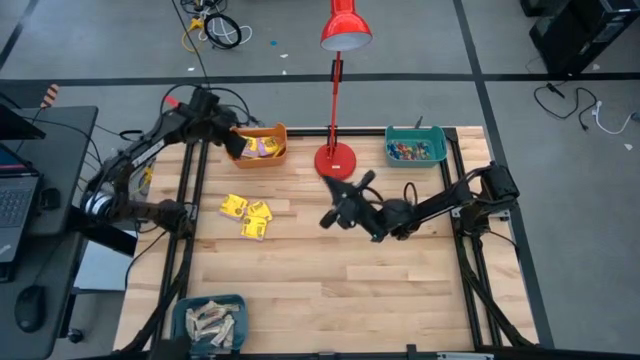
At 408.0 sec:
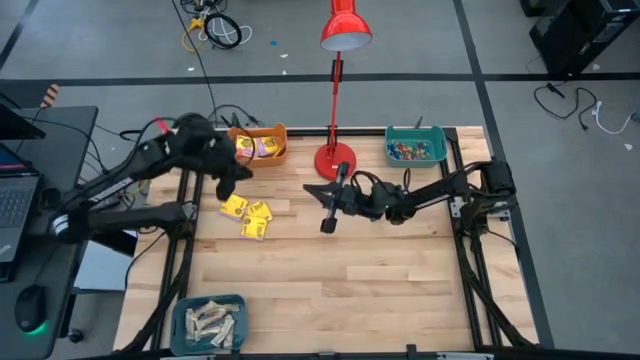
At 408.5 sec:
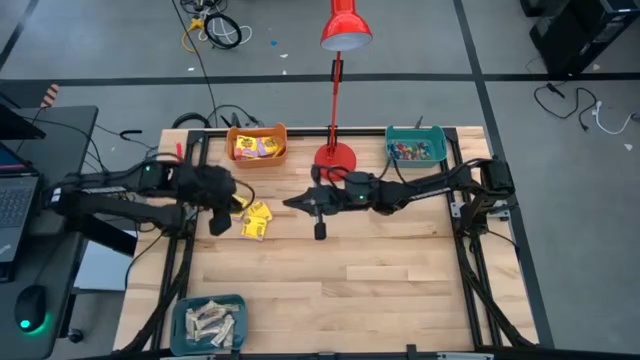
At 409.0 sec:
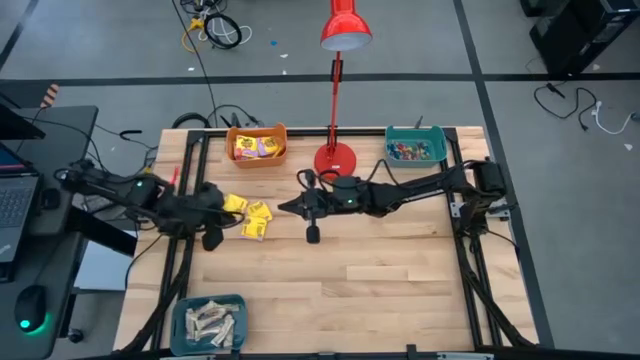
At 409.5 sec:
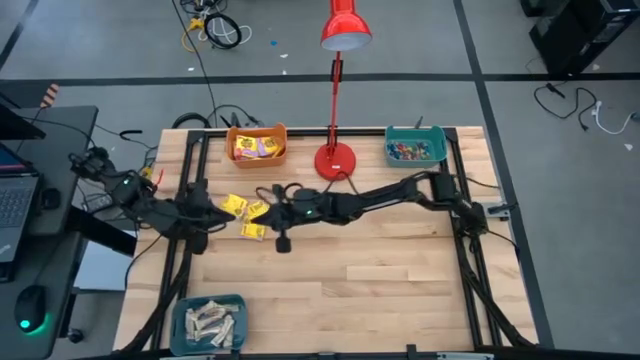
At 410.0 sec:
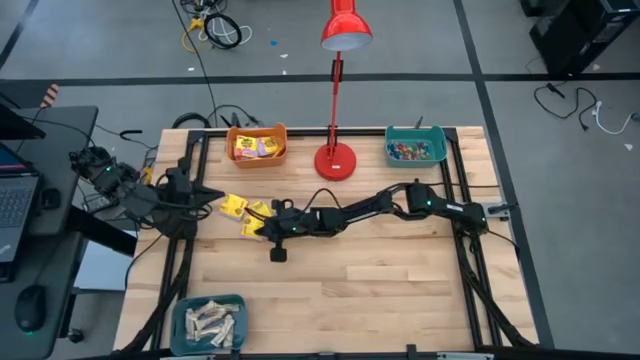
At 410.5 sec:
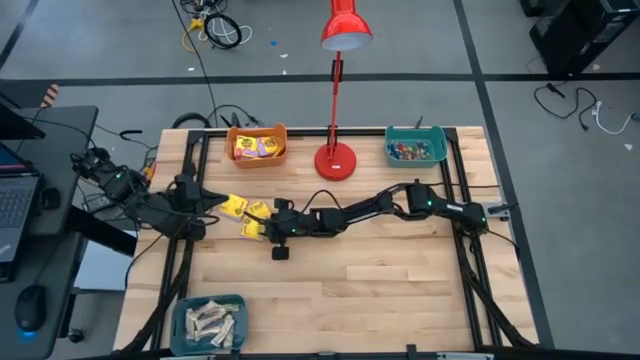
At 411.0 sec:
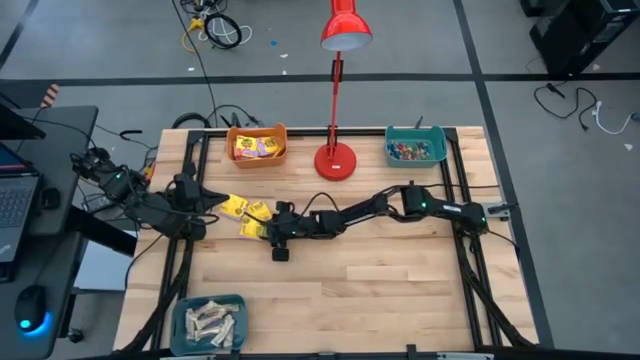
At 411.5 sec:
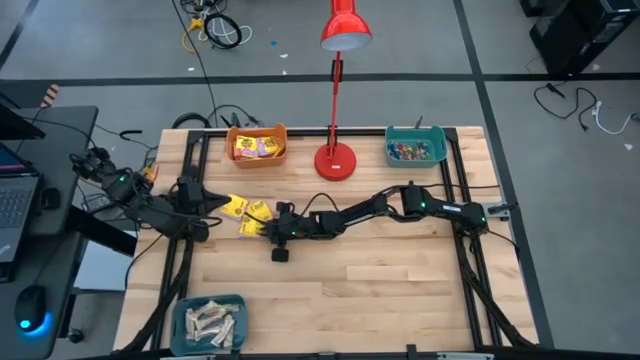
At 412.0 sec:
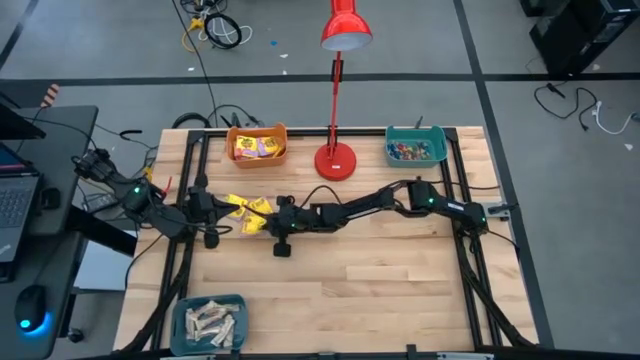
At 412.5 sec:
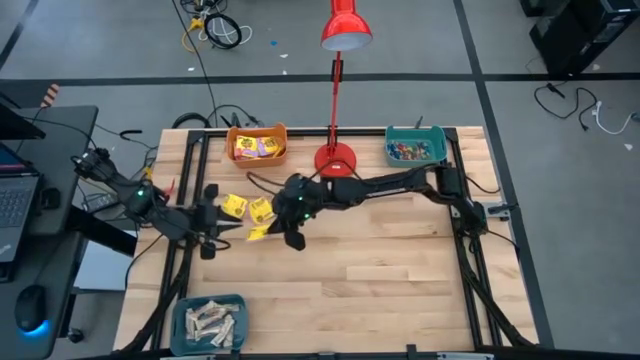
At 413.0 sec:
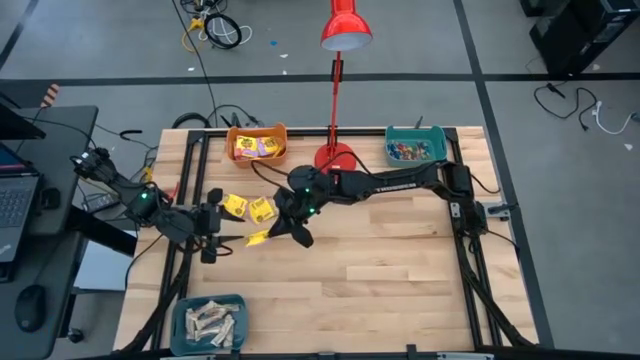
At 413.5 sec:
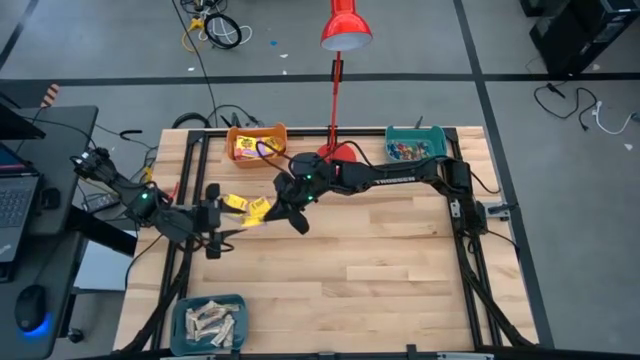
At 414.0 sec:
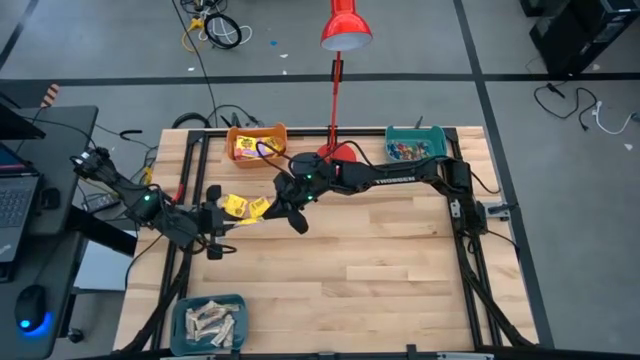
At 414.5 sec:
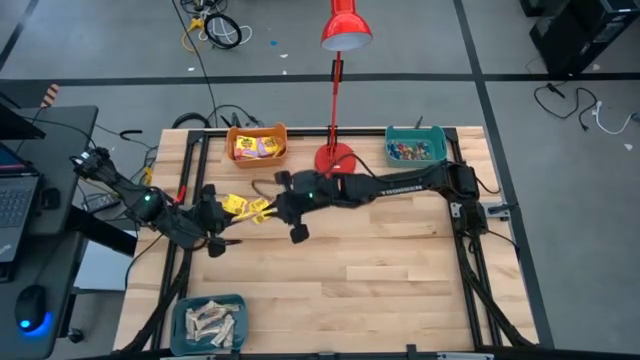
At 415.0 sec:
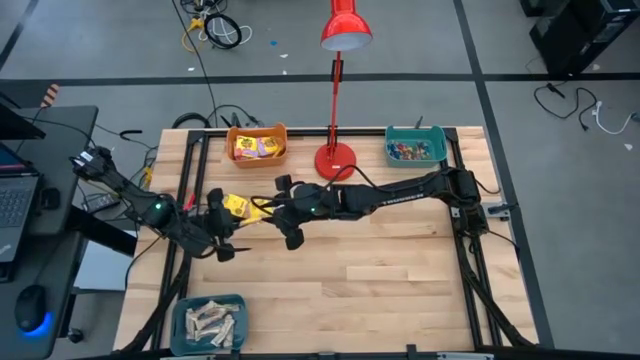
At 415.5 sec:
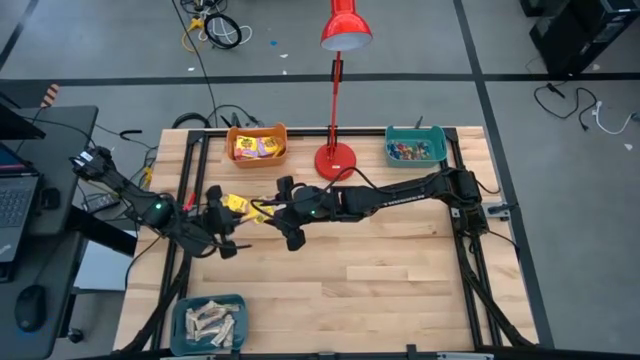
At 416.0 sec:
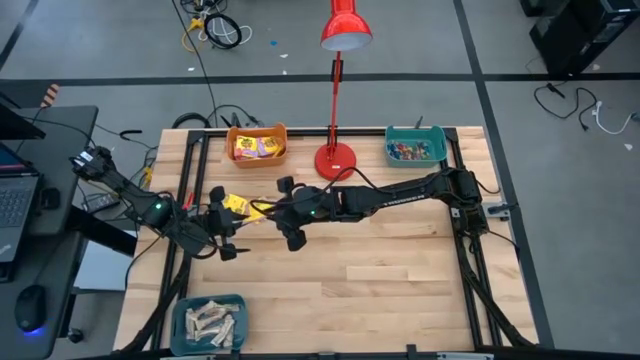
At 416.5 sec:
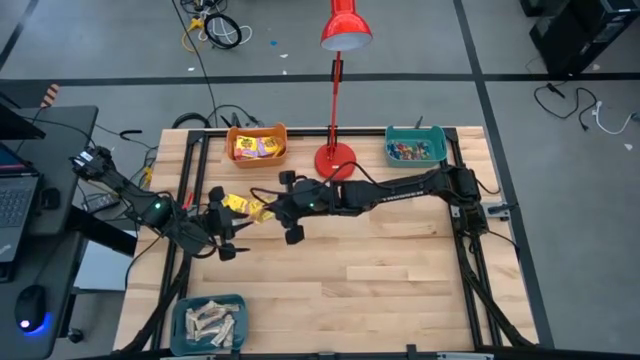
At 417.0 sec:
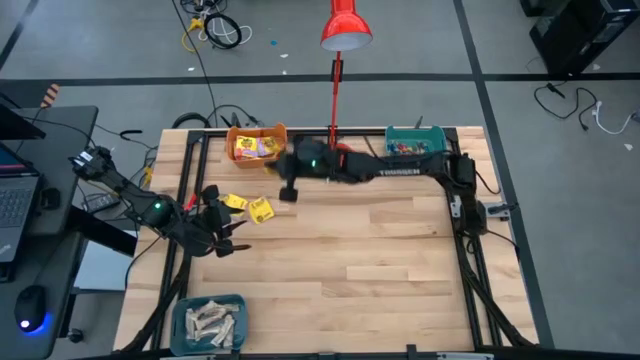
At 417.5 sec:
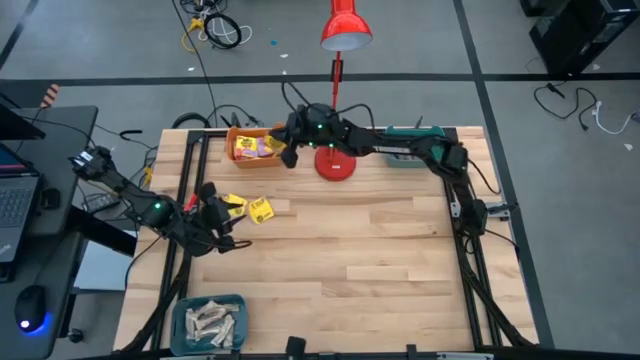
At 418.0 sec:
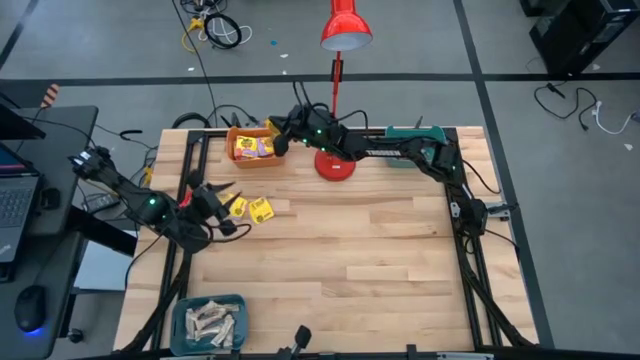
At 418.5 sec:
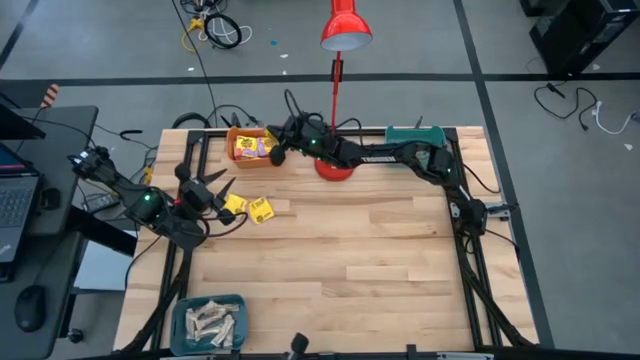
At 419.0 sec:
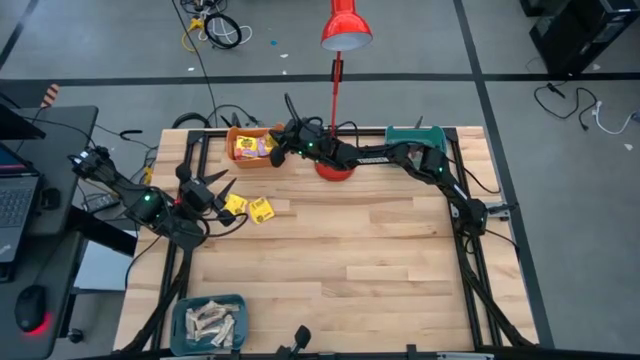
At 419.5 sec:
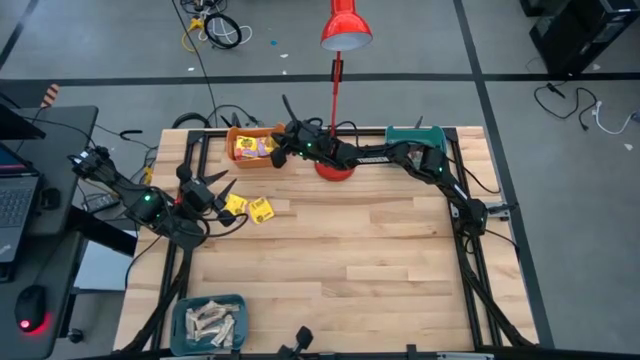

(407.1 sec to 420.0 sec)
Task: Sort candy
Put the yellow candy into the orange bin

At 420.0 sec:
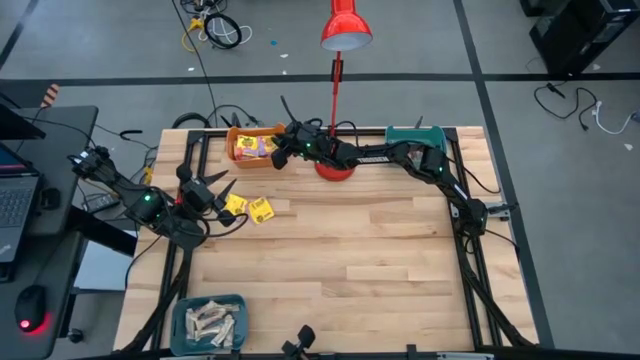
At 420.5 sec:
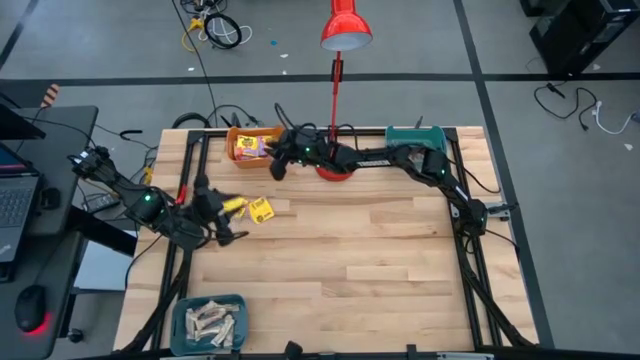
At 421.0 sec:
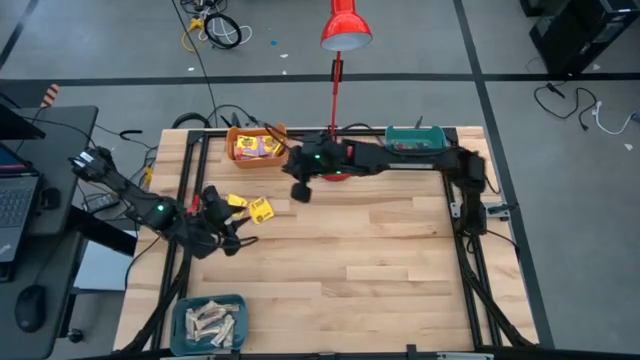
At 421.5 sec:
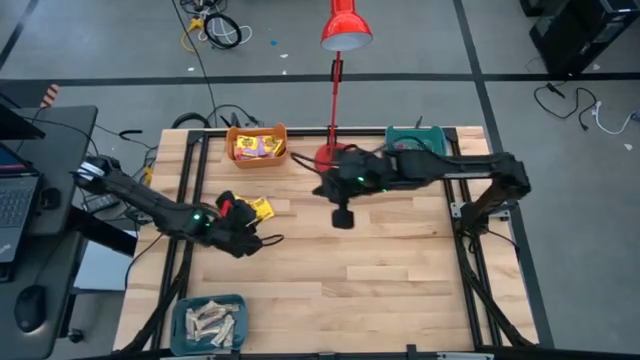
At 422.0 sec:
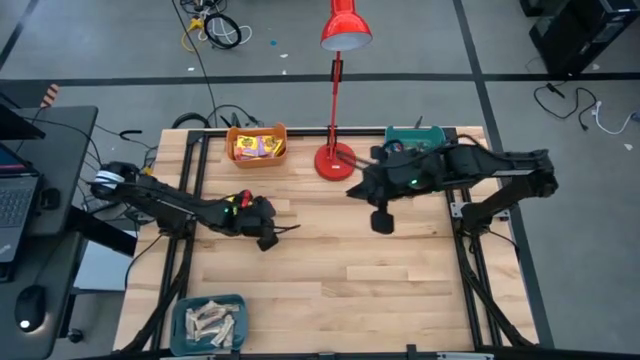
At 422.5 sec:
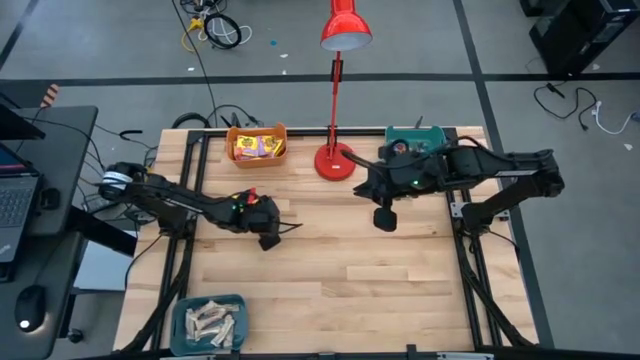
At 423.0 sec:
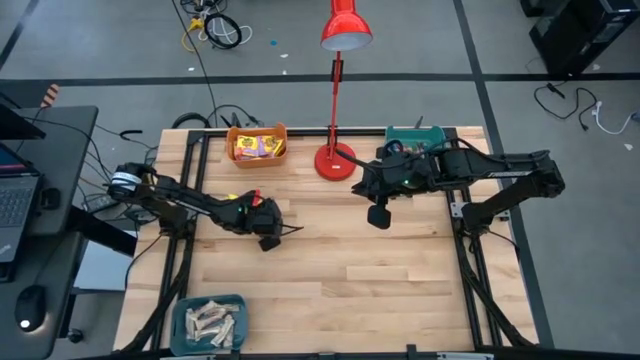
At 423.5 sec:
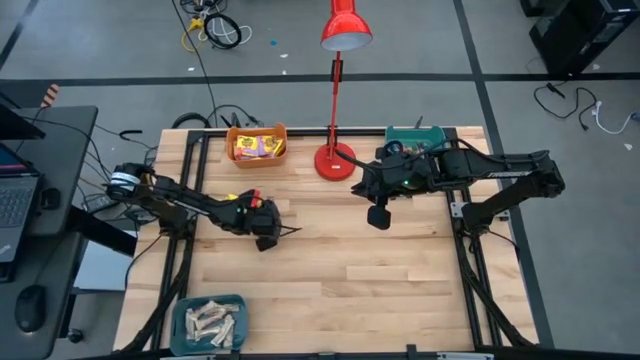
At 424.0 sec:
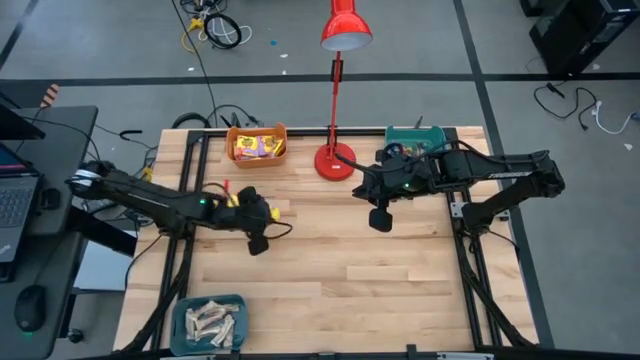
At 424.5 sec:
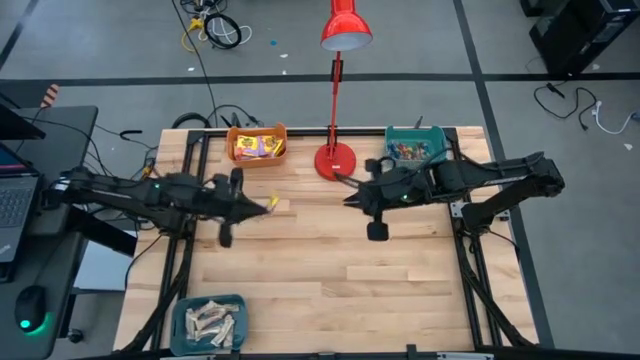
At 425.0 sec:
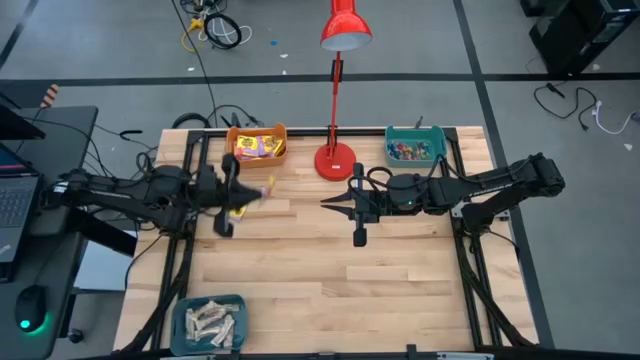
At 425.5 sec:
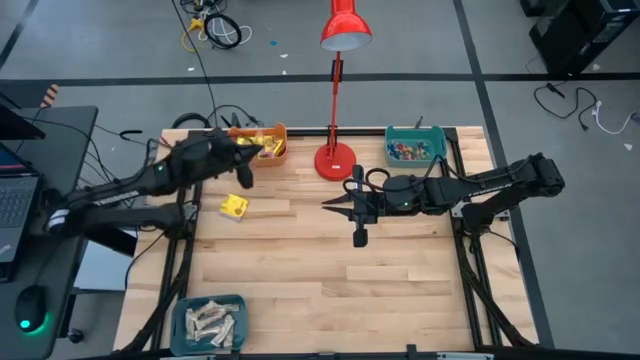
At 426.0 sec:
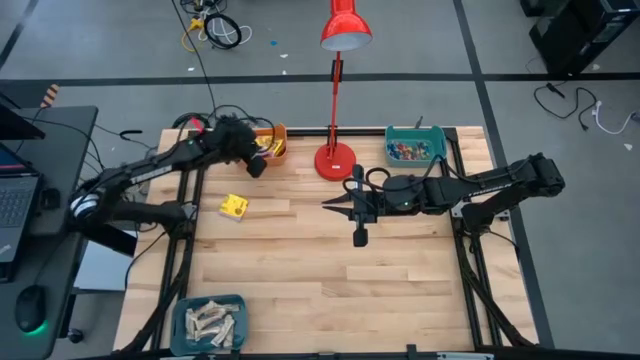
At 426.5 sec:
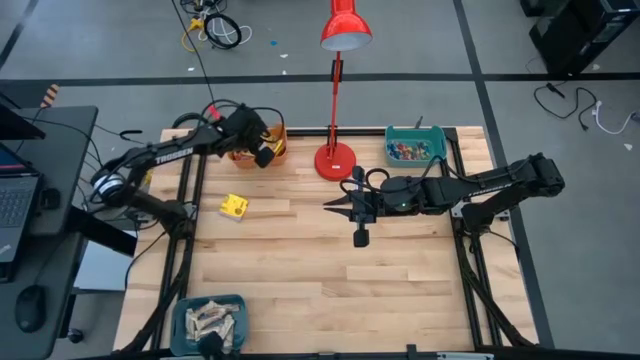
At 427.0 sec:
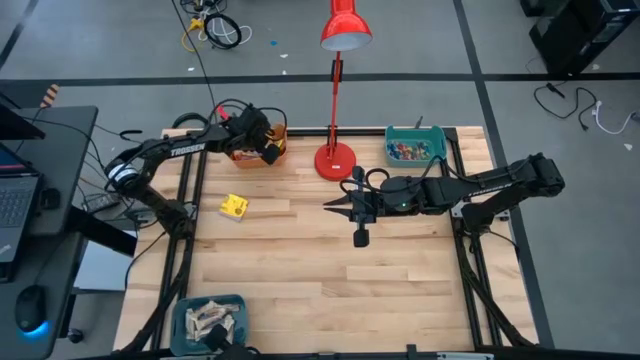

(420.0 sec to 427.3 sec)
Put the yellow candy into the orange bin
